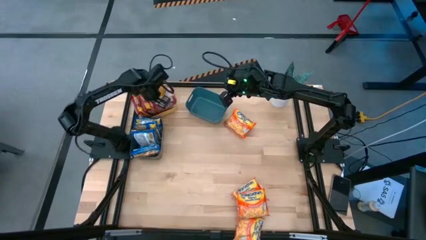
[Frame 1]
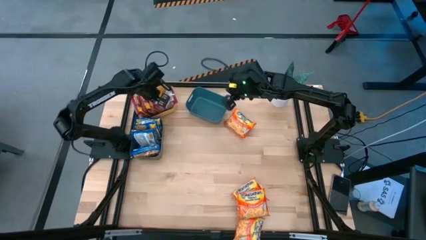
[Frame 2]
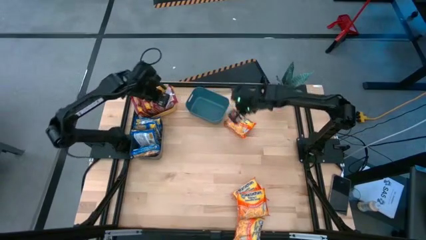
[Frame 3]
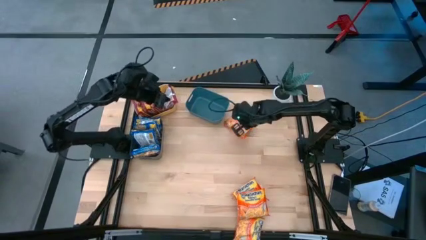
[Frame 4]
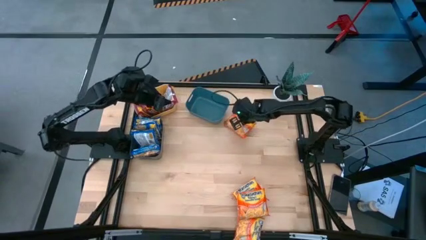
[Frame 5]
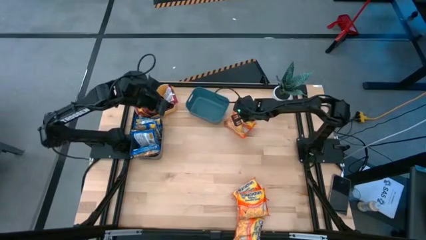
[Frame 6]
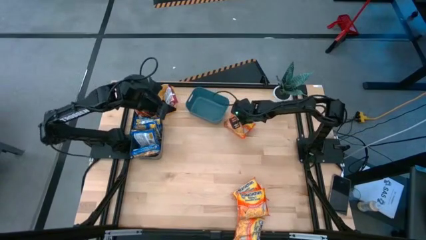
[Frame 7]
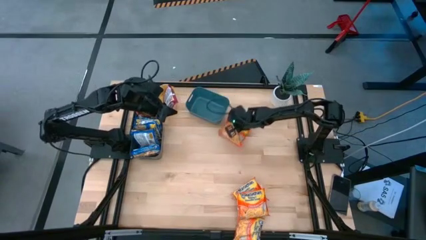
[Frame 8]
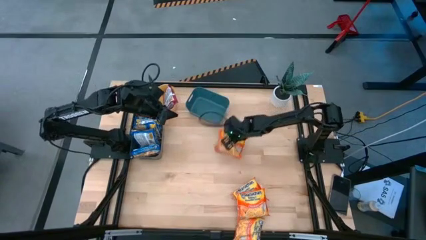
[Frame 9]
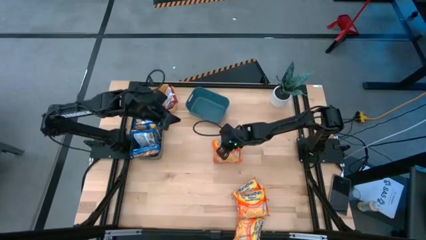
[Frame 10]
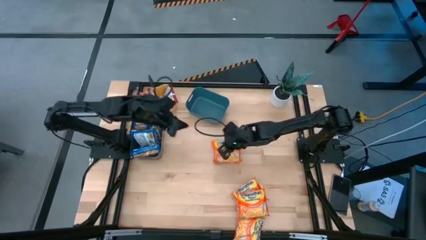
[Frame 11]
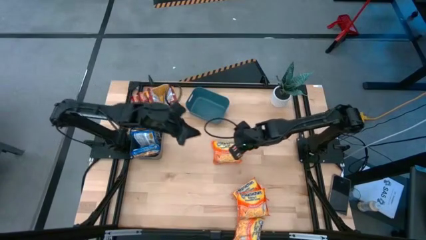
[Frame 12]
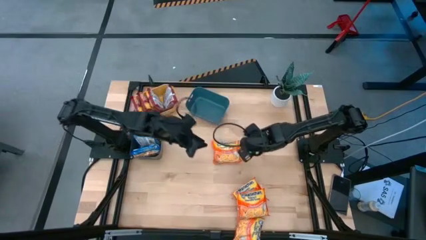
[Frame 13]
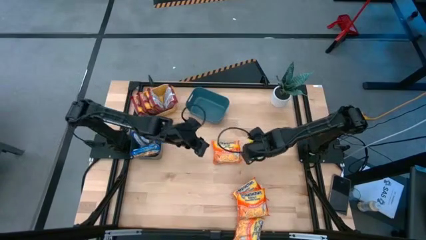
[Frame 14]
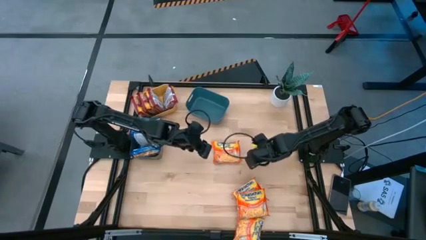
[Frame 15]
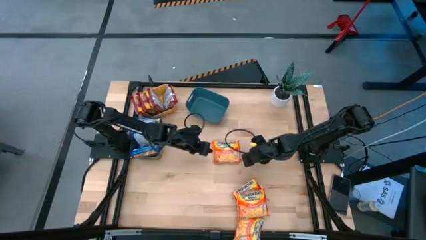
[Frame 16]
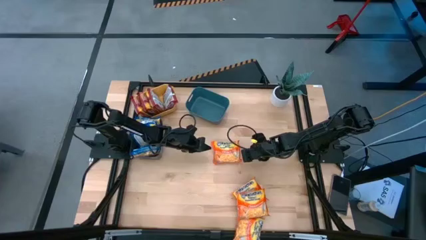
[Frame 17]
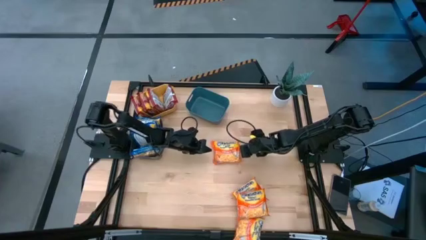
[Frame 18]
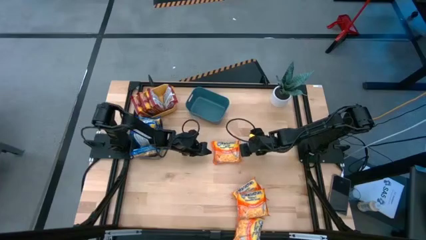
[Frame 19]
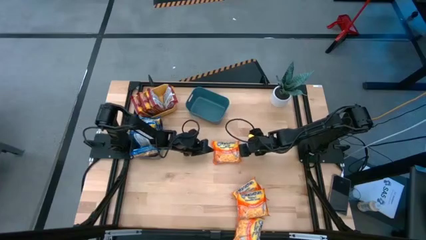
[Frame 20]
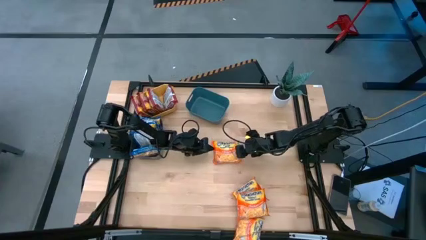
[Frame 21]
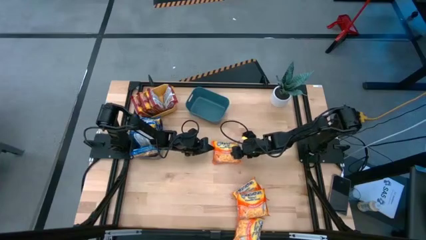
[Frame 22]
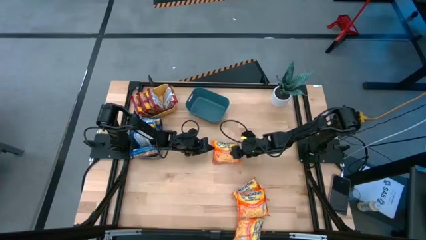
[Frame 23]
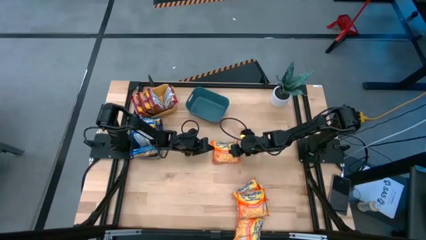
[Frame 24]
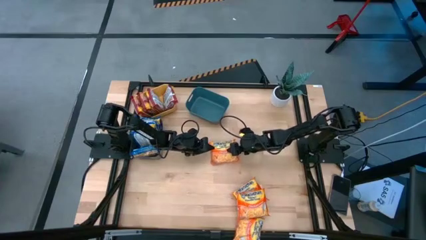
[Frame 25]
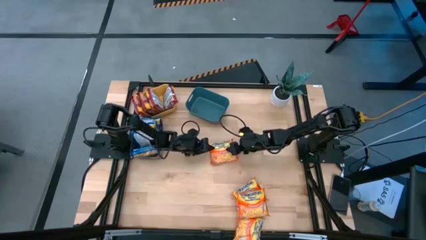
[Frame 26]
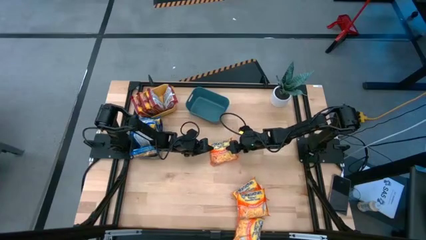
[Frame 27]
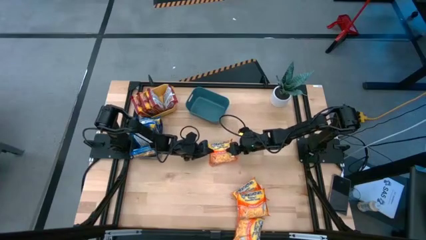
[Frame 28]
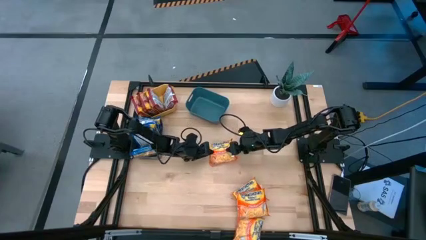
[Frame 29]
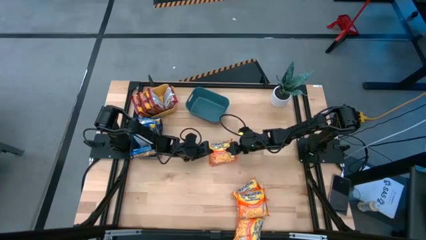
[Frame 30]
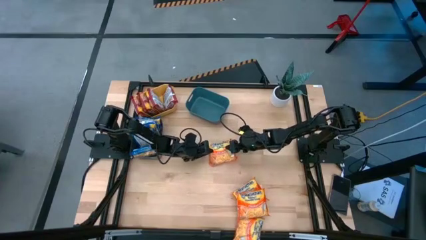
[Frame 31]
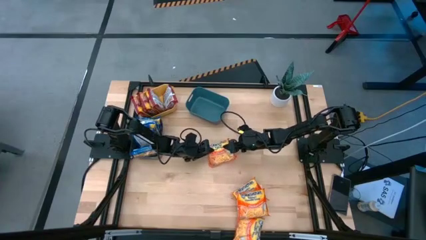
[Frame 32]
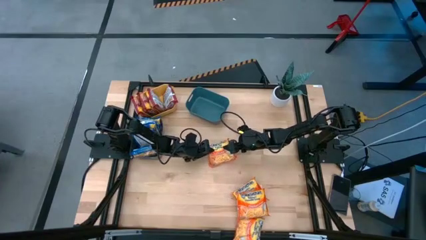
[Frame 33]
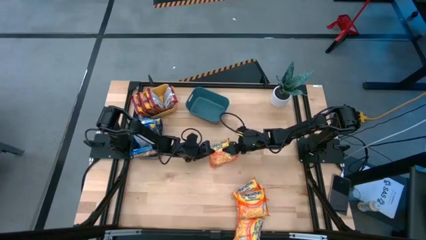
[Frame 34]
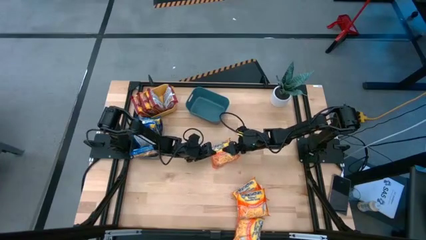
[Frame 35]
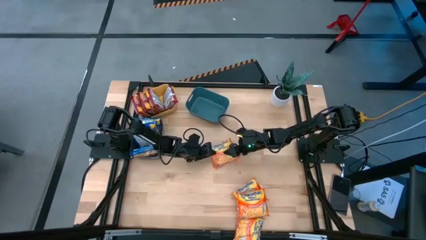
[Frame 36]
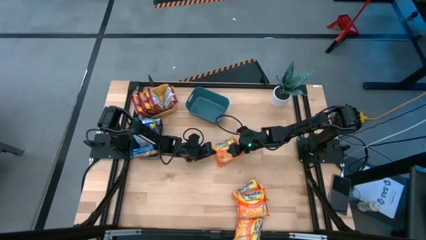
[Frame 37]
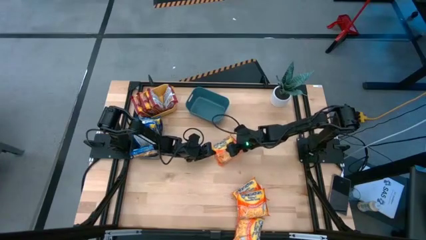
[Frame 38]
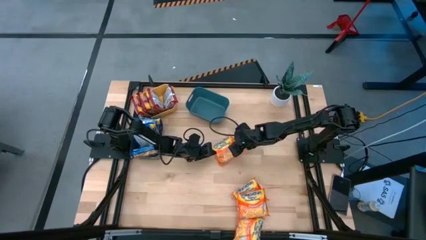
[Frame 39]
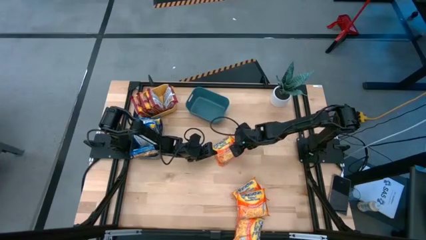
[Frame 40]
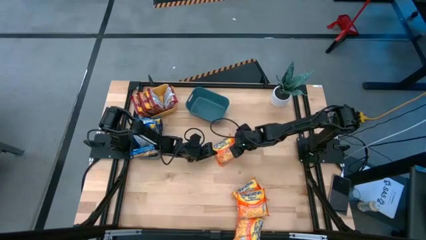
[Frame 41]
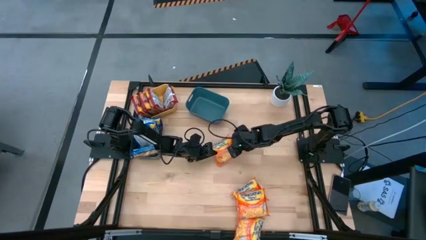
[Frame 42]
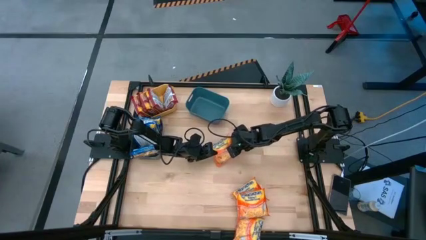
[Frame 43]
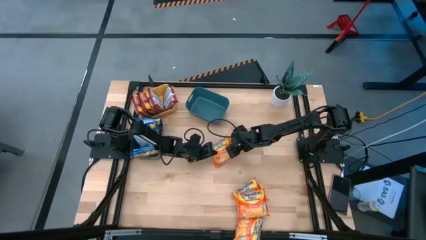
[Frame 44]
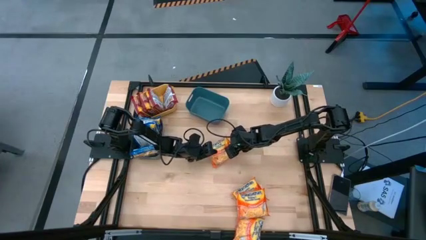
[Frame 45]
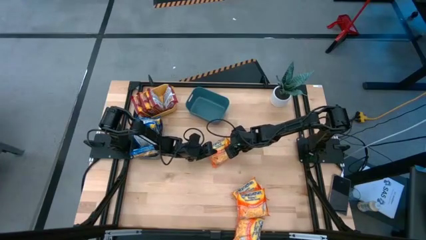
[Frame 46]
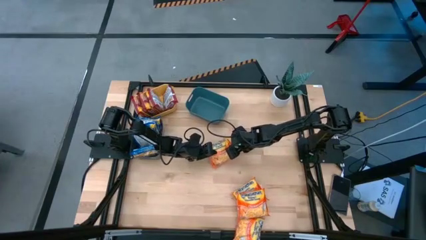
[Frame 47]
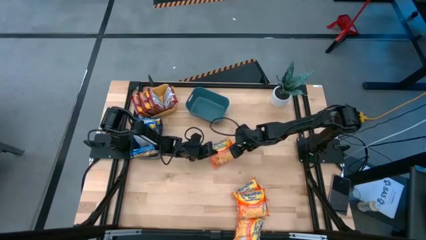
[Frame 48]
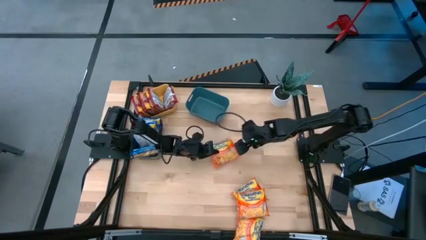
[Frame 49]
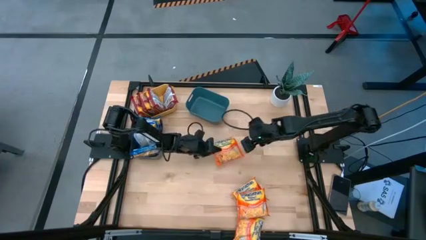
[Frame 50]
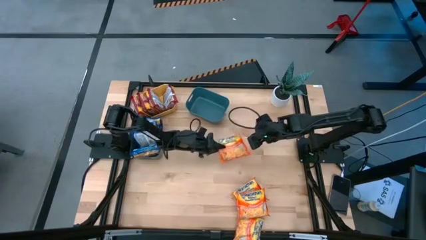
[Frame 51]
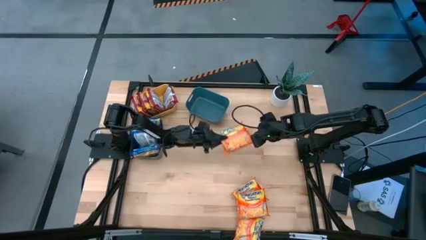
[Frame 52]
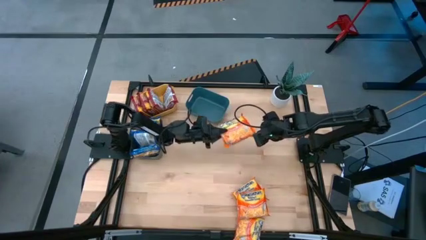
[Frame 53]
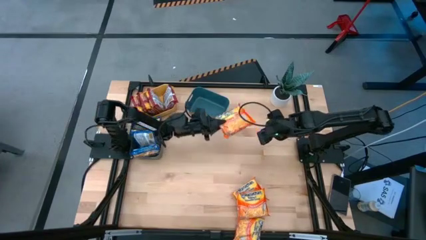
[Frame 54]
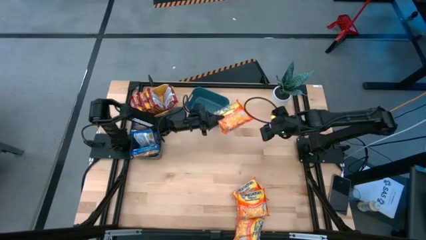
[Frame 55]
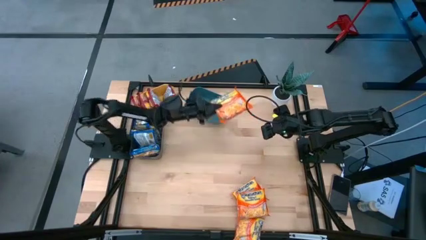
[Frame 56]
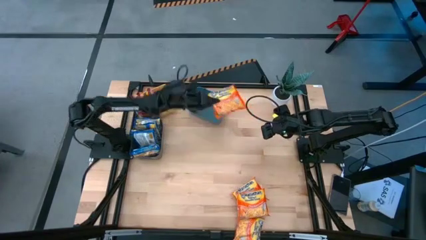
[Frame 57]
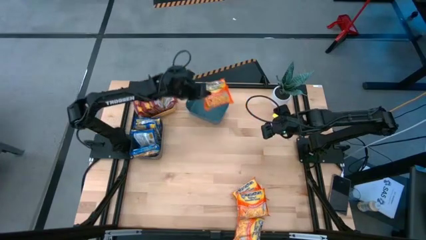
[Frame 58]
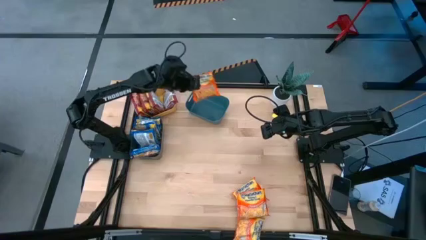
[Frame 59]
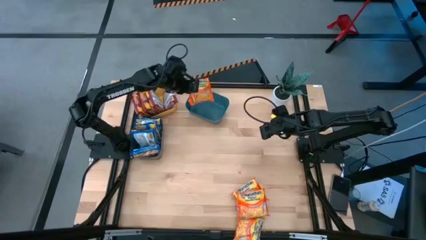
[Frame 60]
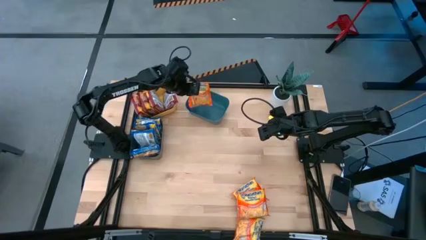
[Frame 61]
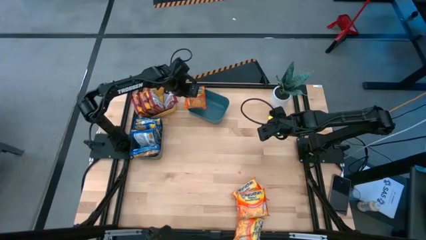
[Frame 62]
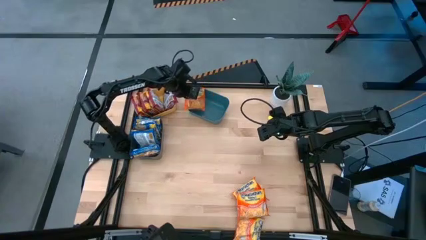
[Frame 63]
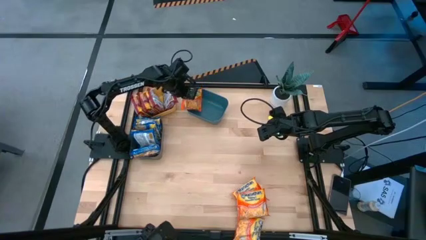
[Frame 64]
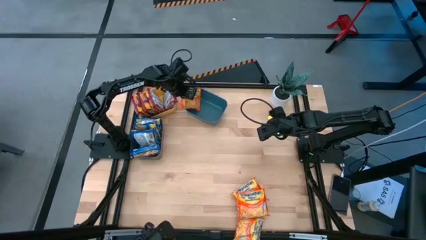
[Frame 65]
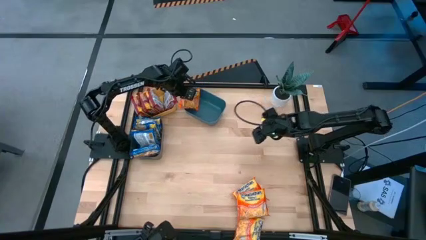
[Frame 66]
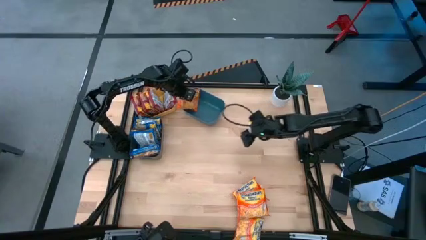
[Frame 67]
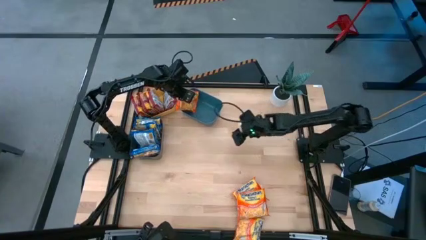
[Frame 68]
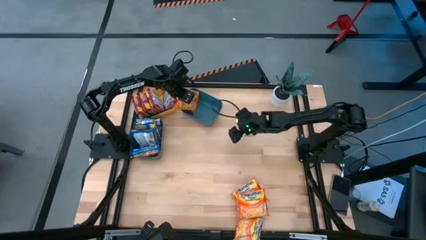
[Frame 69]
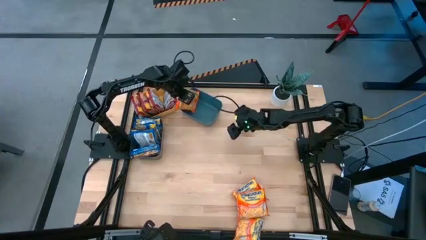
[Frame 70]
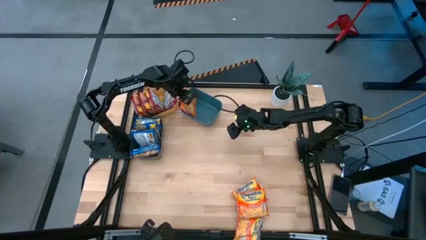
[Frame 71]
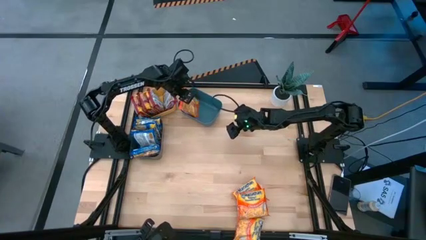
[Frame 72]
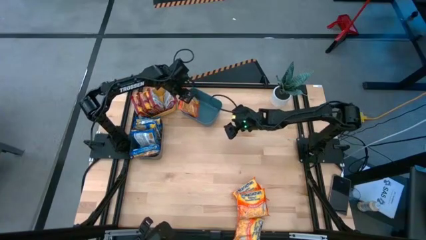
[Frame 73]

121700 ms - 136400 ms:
Task: Sort Maruchan noodles
Put the orange noodle pack into the blue bin
